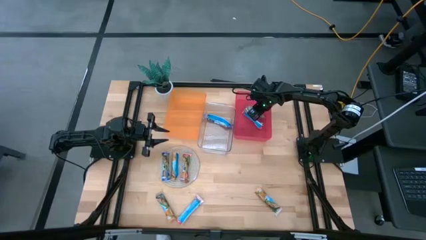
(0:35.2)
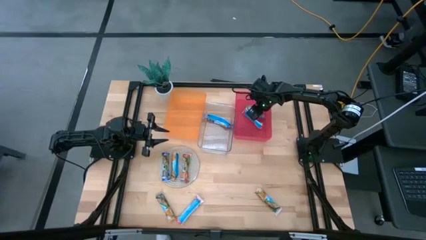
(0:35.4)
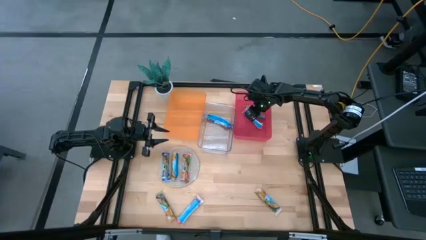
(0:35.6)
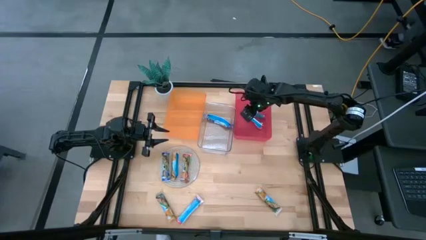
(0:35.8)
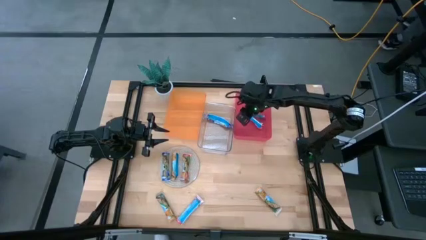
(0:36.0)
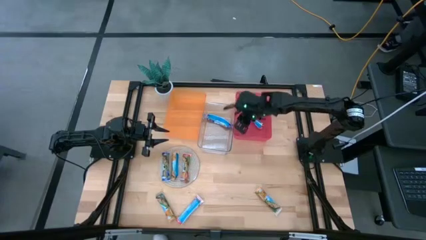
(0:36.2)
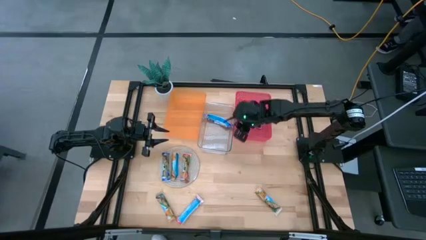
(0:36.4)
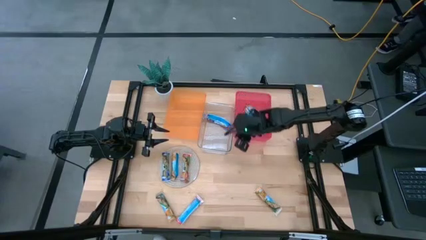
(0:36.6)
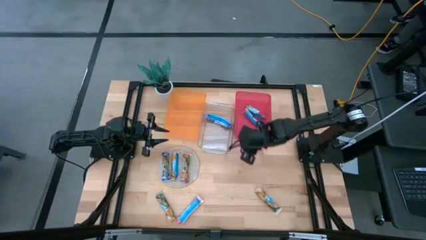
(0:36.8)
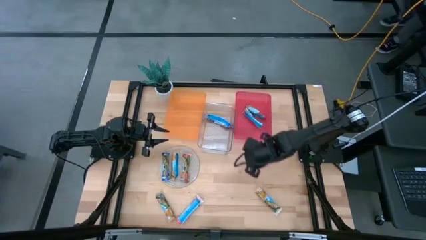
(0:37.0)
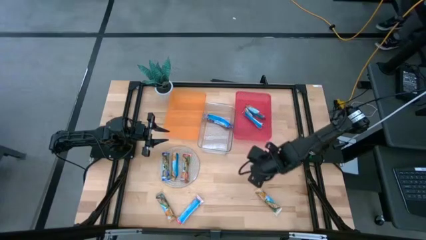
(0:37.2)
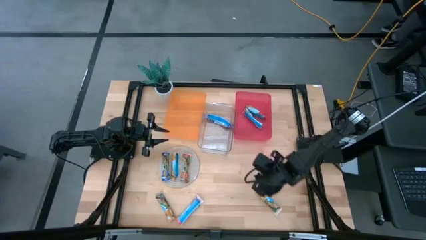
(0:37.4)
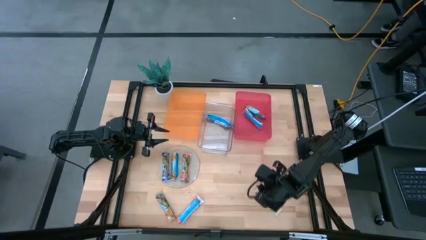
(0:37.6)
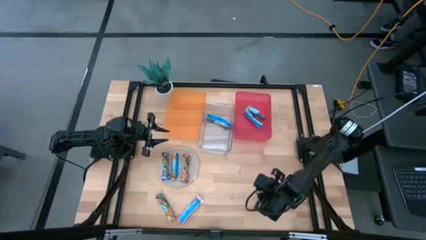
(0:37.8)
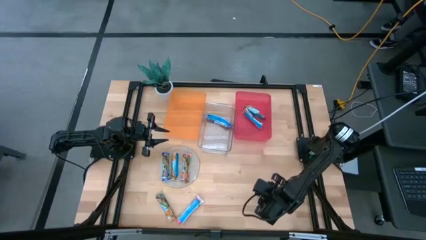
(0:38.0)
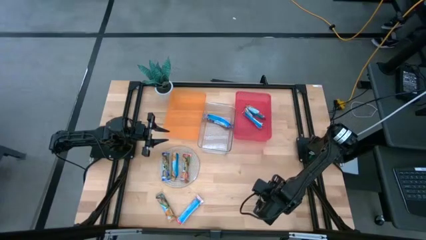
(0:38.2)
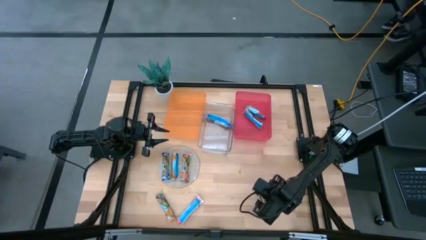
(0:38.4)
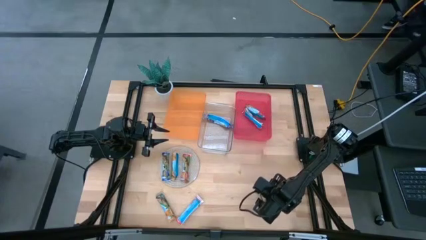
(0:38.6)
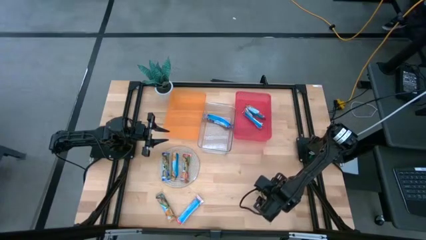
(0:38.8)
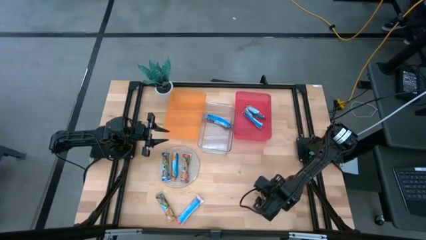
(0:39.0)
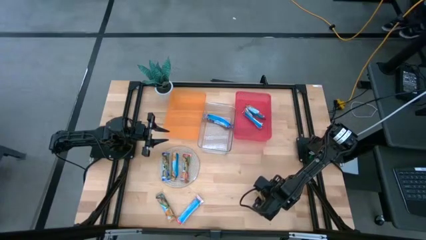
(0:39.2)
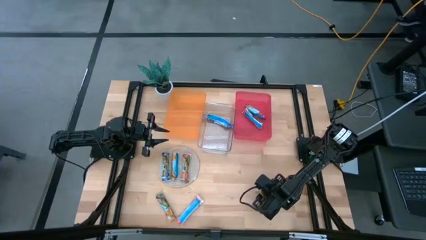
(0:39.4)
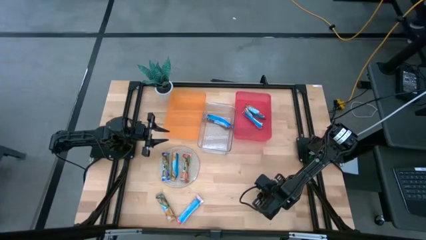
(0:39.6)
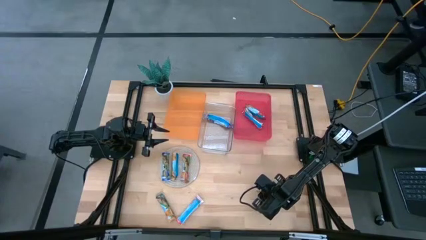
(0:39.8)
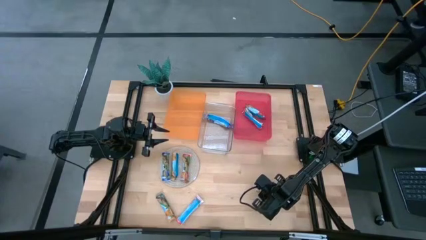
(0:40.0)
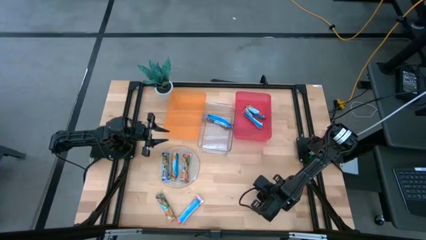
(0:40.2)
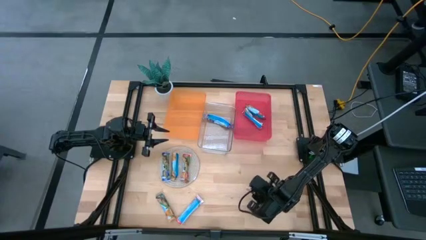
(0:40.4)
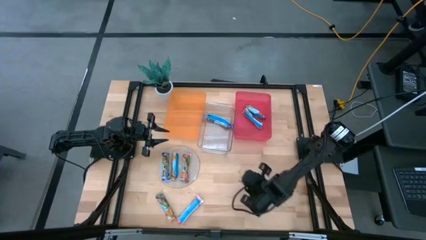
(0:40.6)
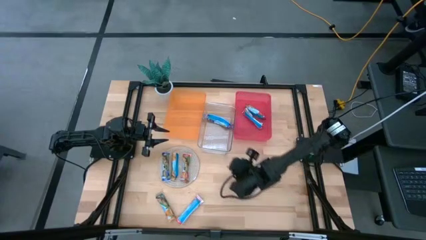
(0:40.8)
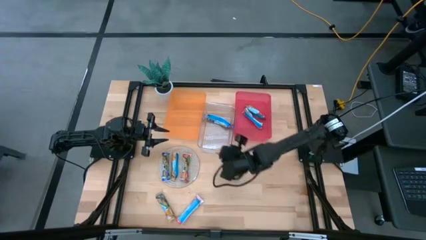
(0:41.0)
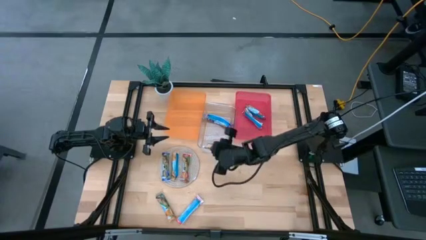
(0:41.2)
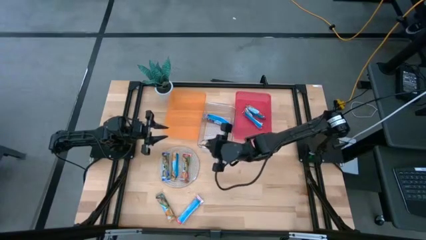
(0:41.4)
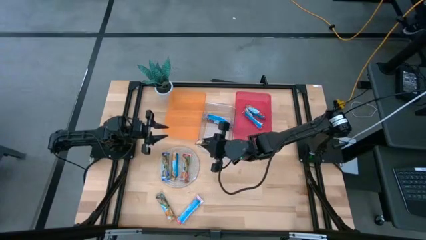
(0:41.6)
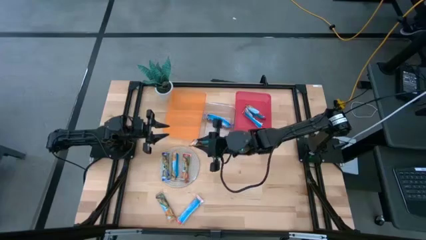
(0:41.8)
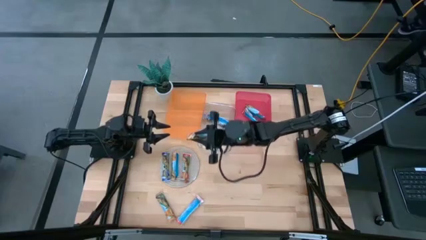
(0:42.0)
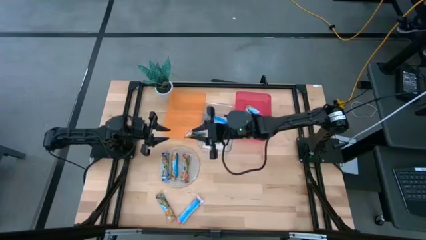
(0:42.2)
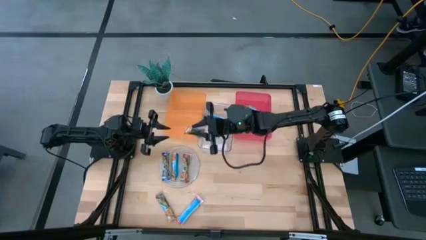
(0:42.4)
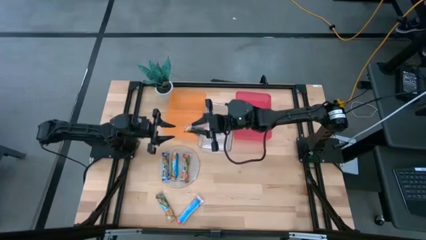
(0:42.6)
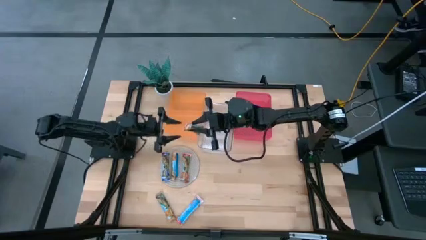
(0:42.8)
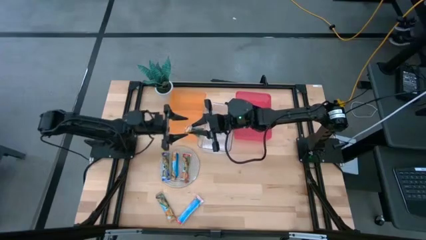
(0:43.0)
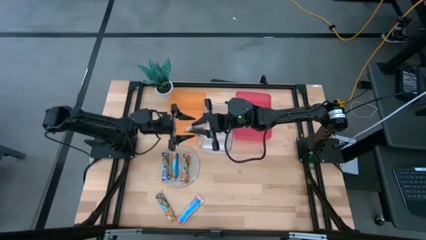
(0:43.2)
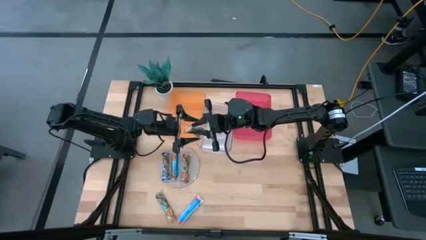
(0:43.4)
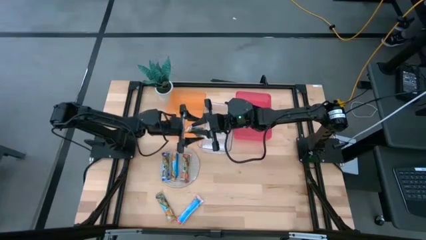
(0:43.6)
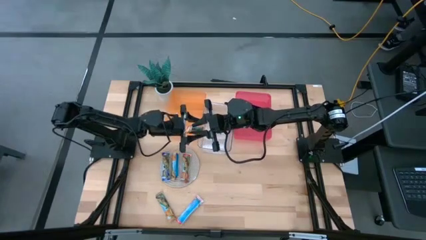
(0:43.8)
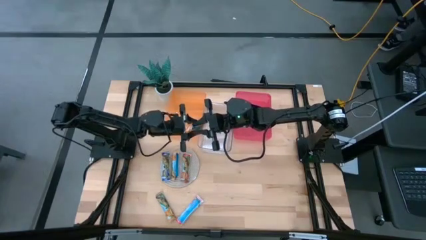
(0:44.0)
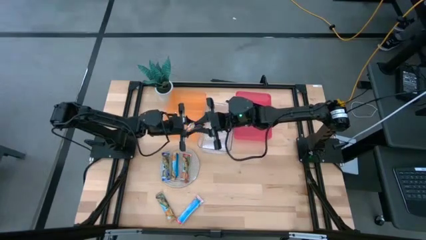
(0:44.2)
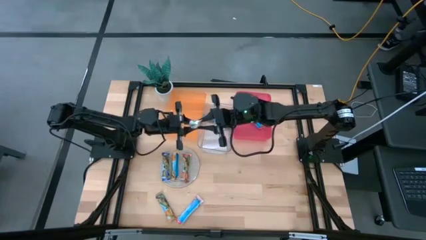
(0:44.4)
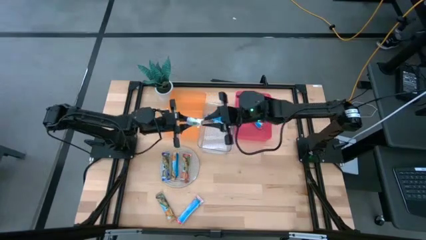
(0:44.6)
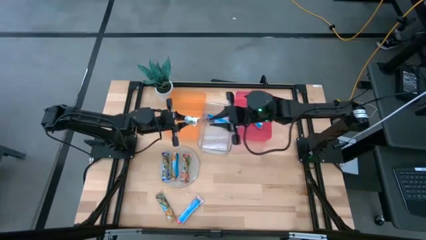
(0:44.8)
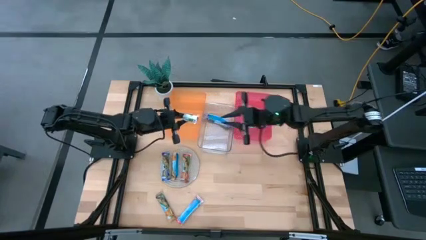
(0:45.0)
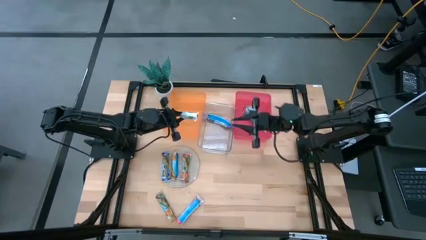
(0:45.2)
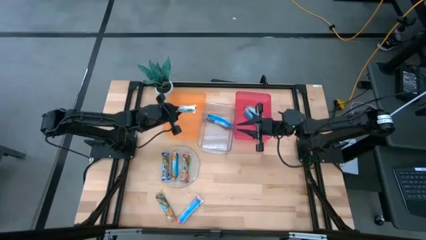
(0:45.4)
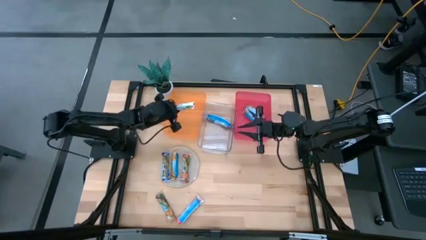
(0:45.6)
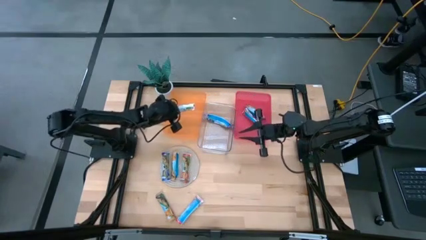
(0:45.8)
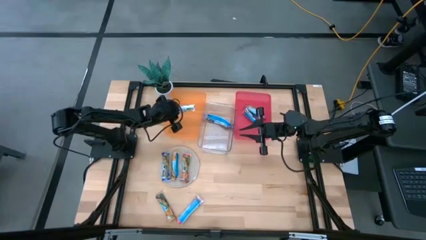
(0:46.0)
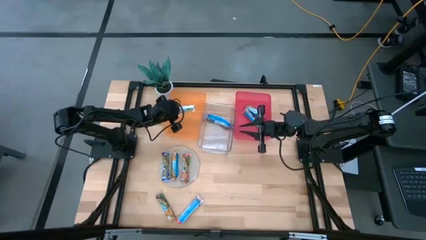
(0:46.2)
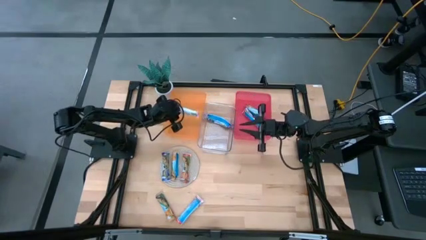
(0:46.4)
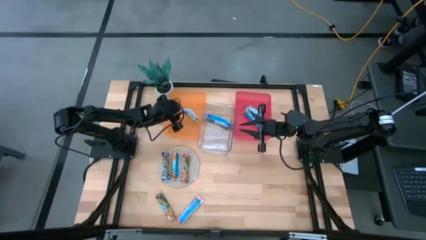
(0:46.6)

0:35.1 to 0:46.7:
Task: Pick and place Granola Bars by type
Put the bottom right yellow granola bar into the orange bin
